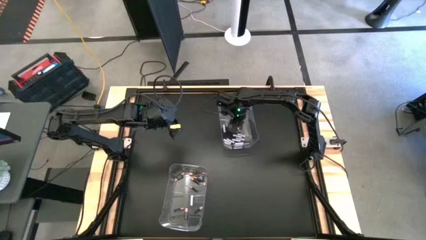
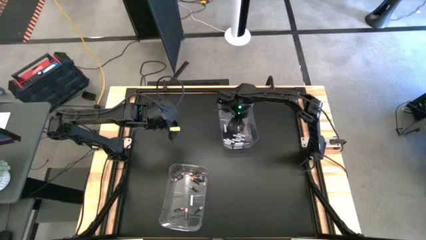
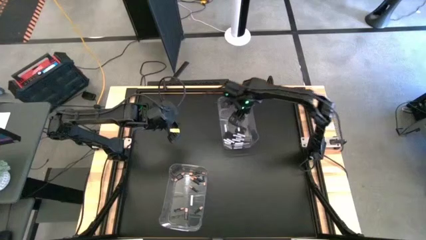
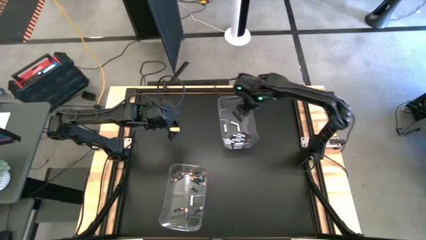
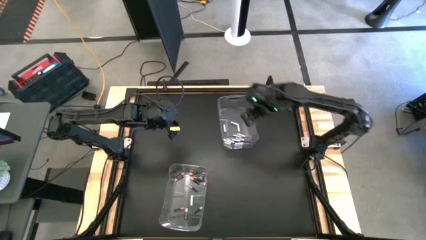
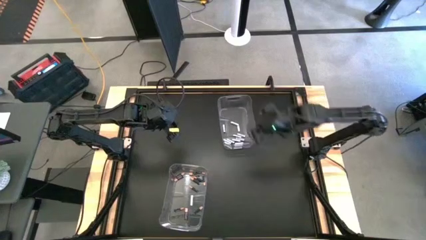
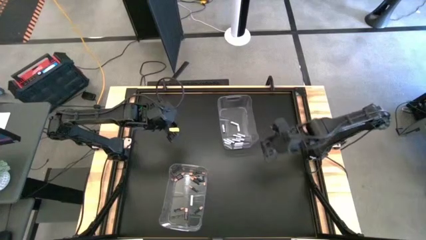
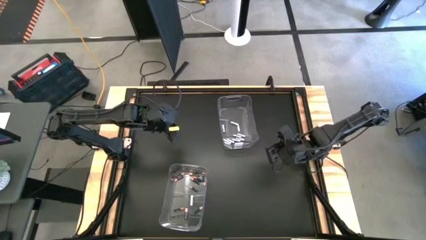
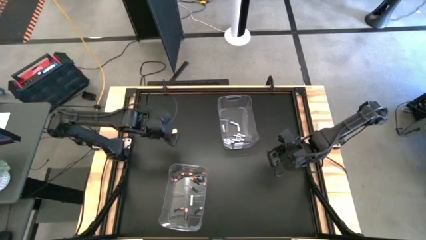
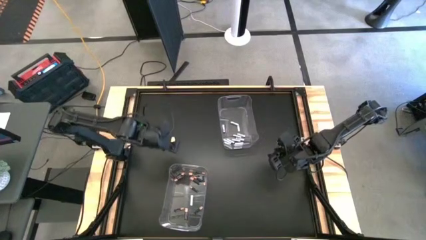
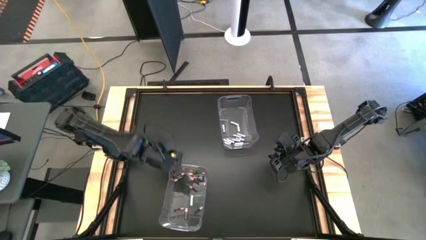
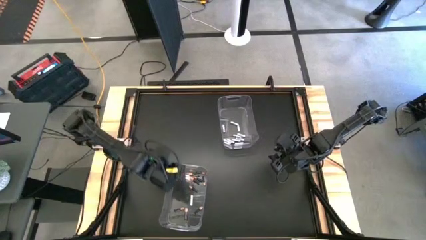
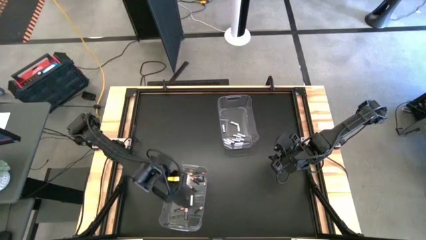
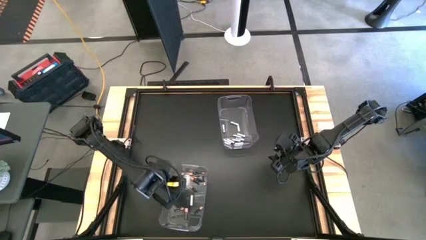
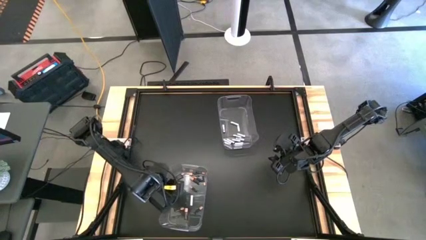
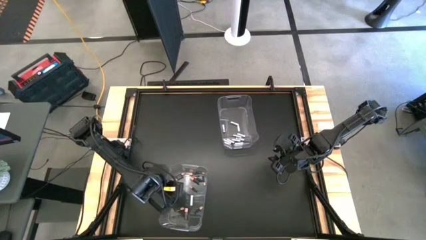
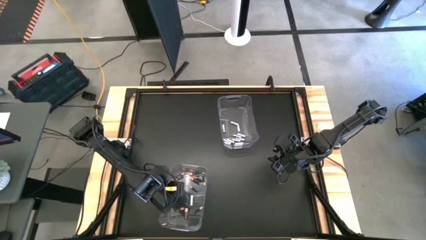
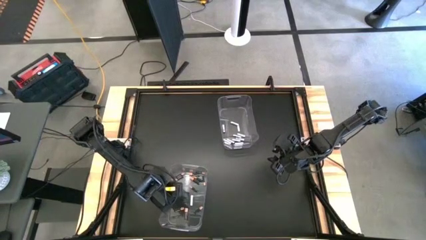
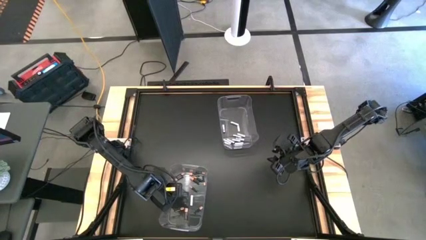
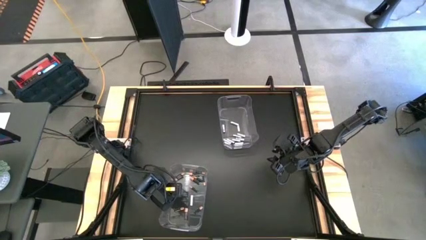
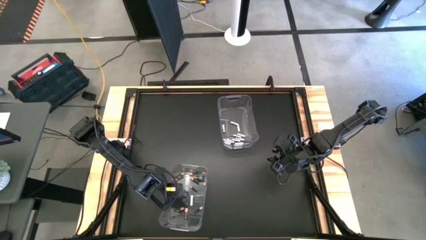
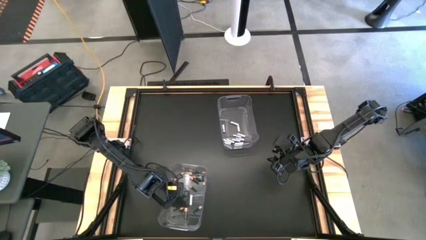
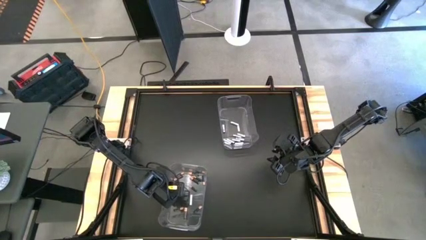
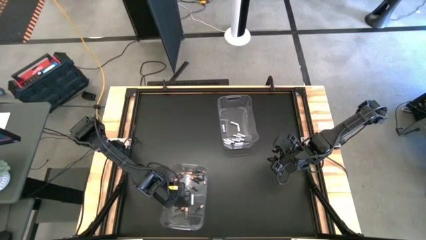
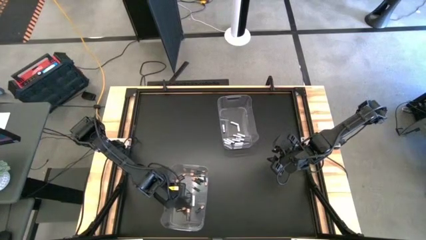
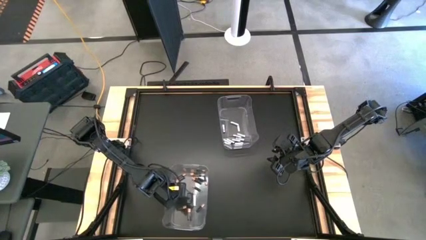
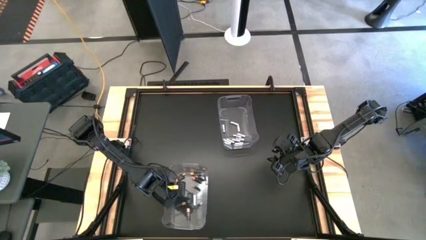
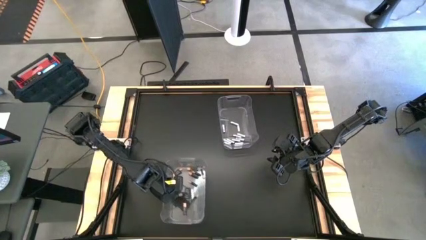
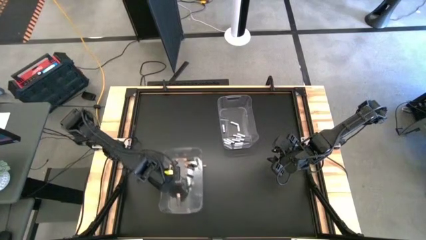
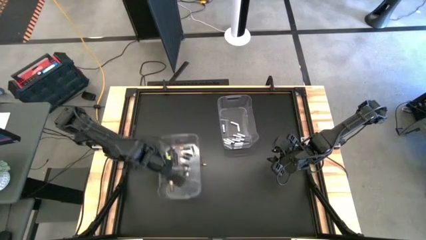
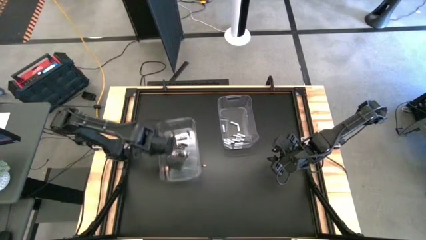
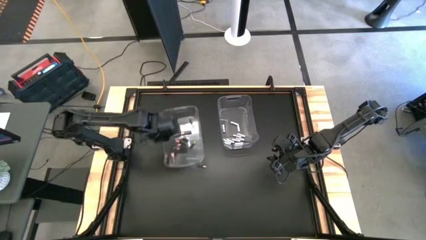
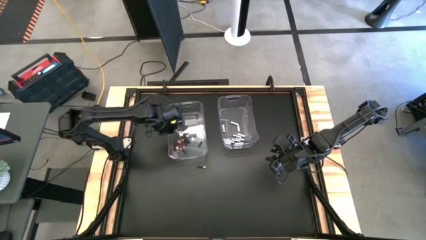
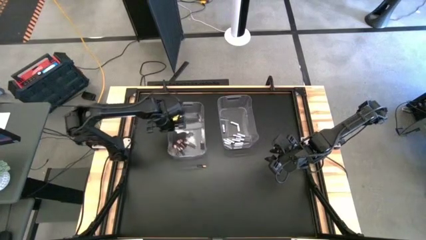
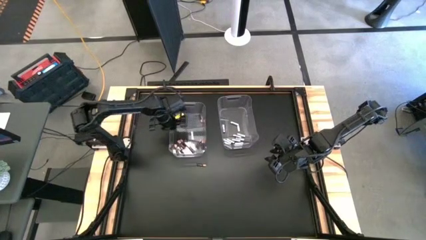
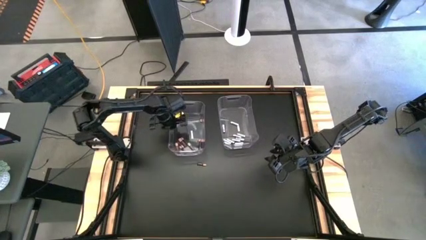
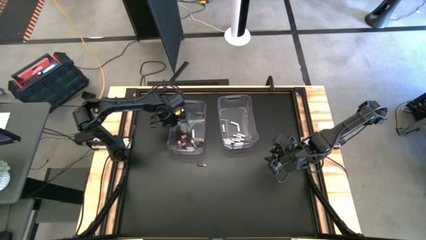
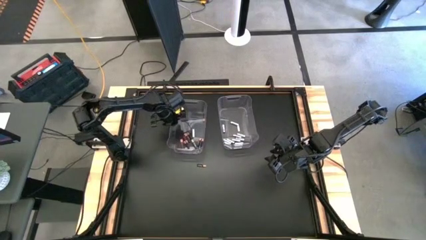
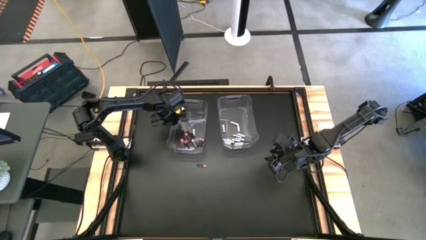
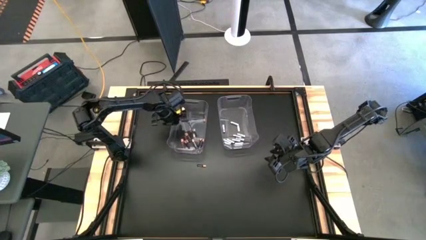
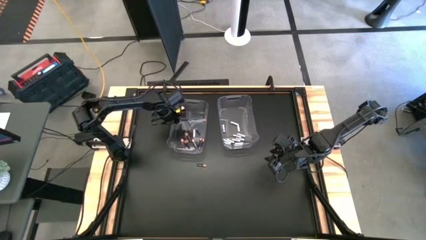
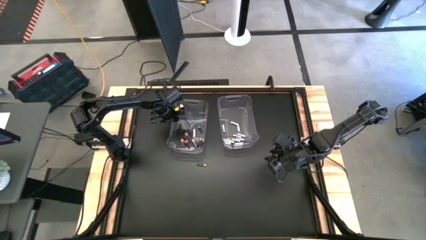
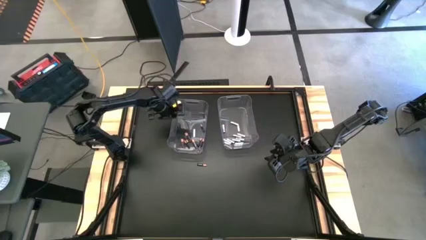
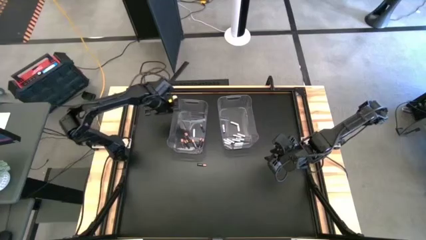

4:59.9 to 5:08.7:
Task: Sort batteries
Move the bottom transparent bin to the top of the table

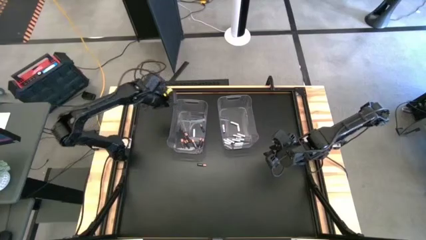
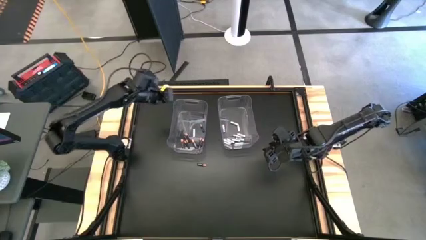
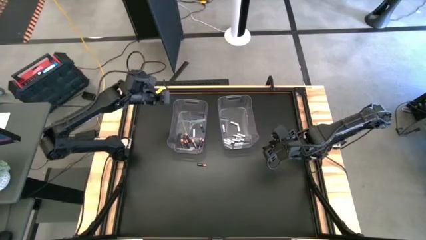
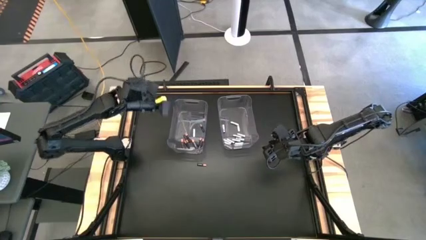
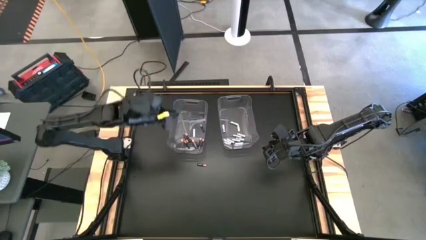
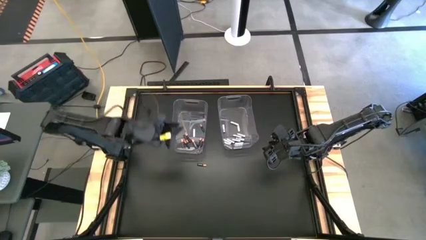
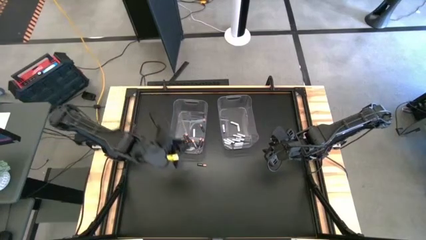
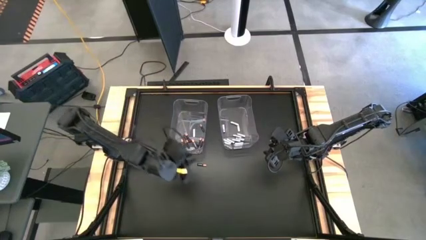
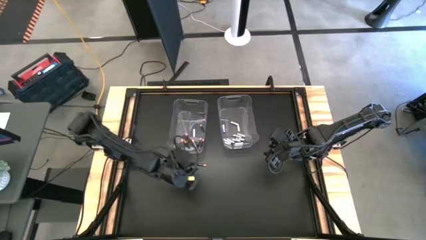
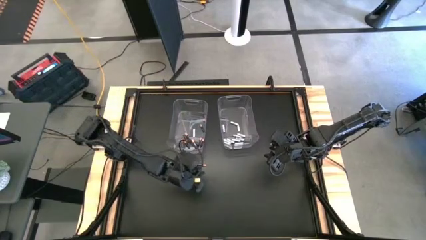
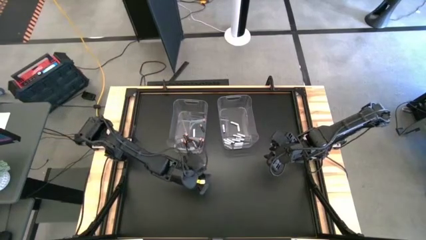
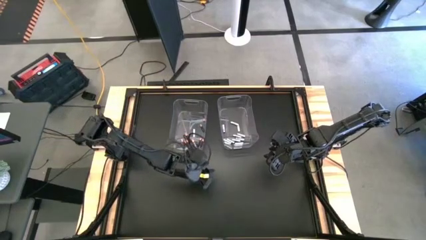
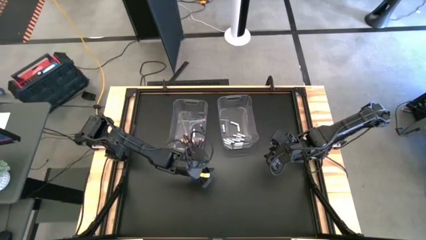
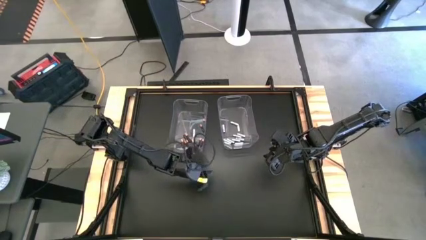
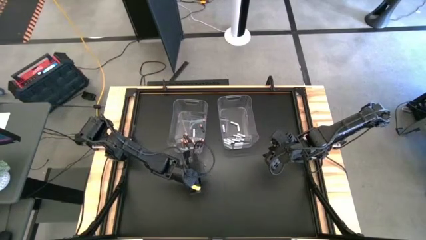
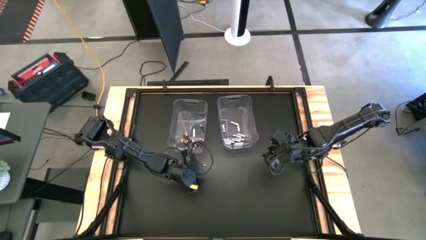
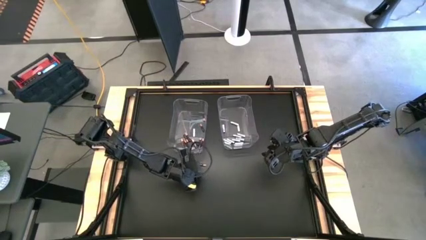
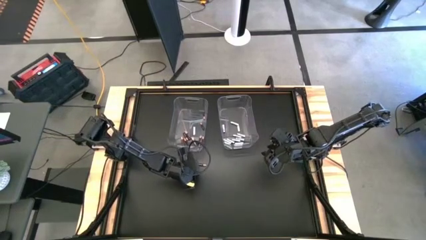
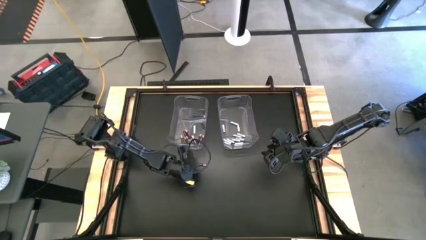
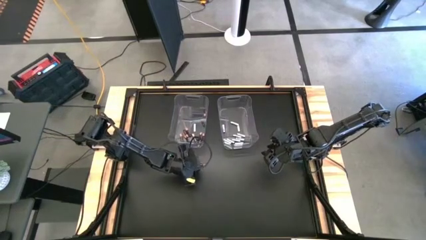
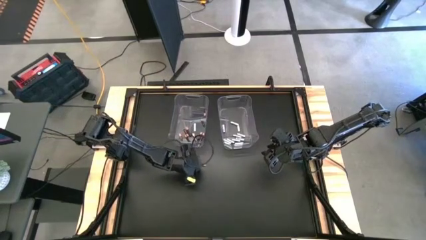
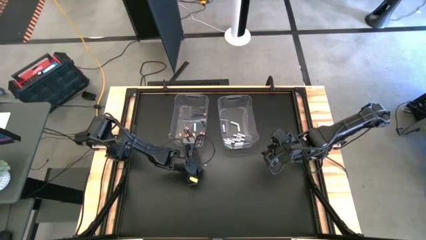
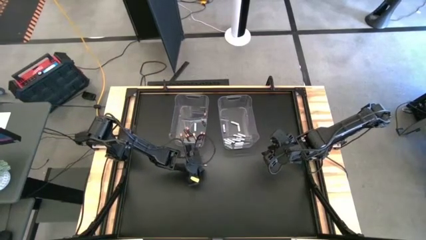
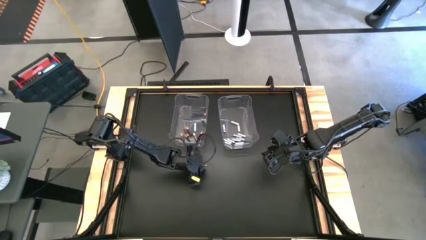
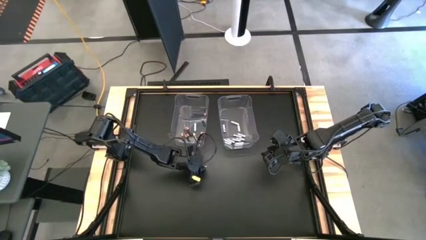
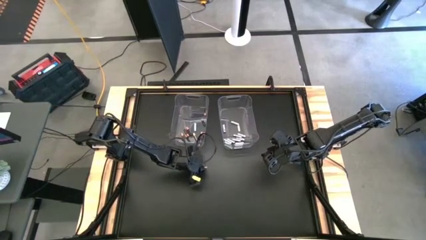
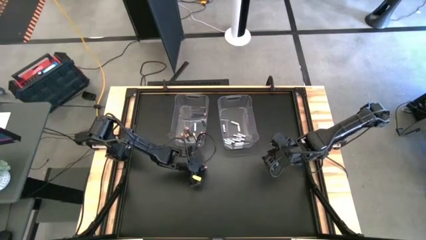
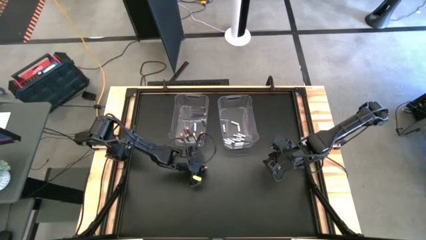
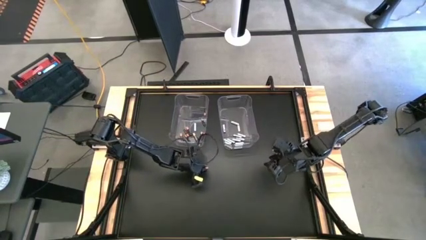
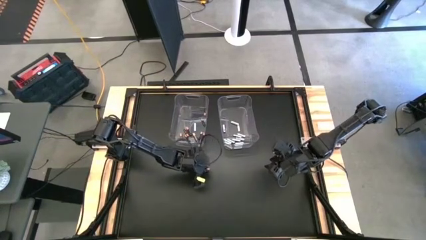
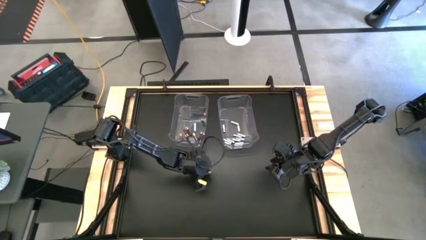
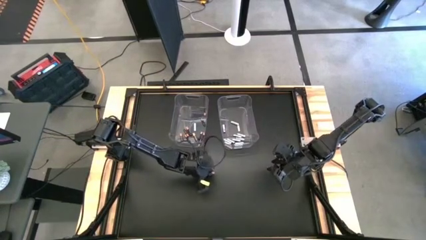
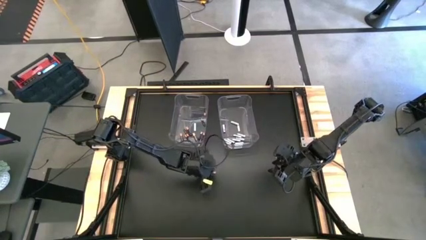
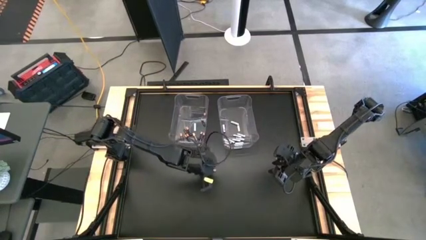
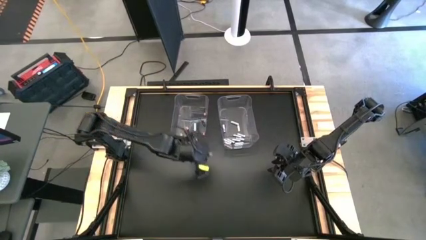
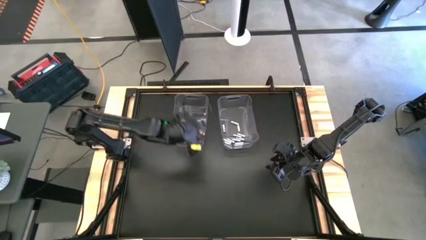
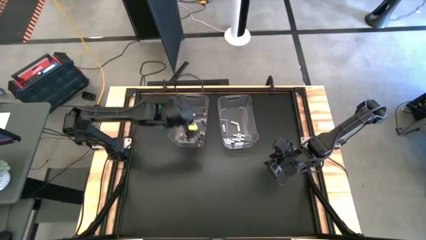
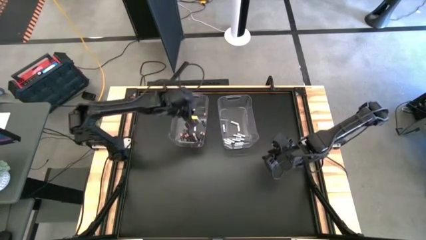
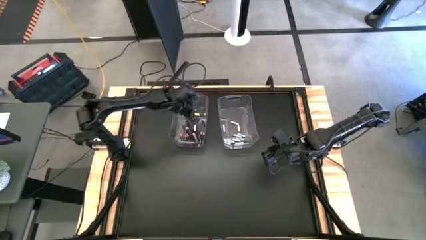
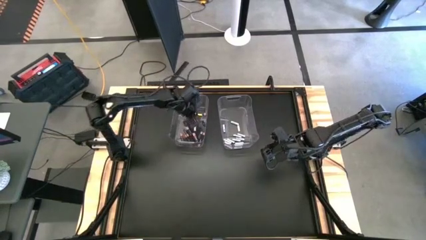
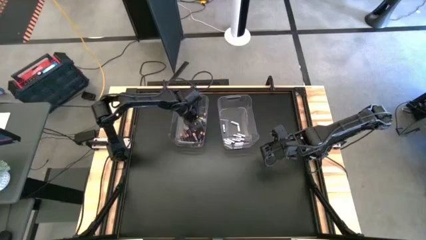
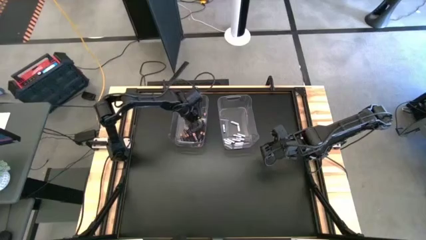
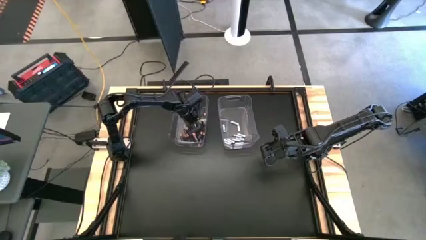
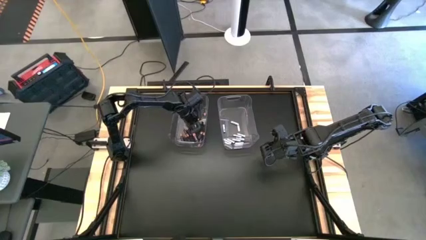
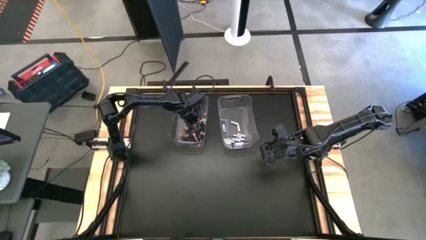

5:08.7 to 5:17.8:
Put the black battery into the left transparent bin
